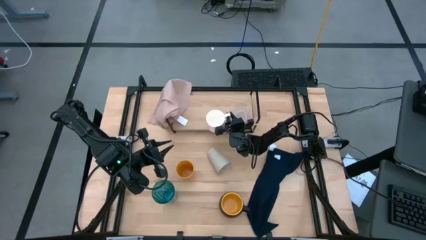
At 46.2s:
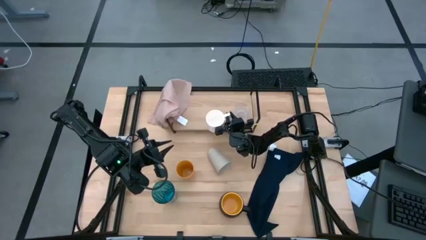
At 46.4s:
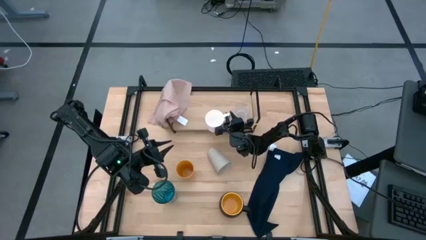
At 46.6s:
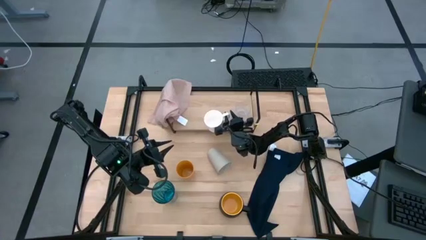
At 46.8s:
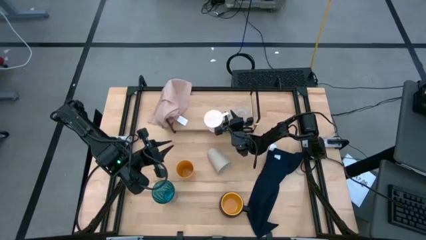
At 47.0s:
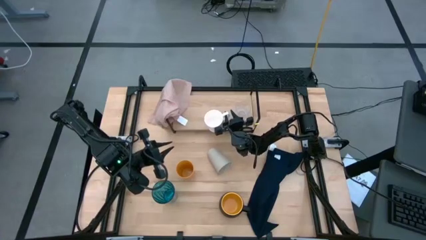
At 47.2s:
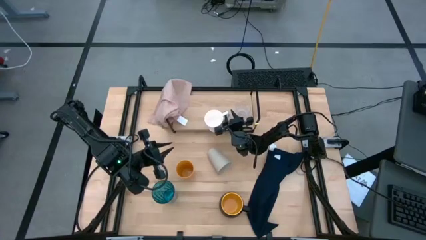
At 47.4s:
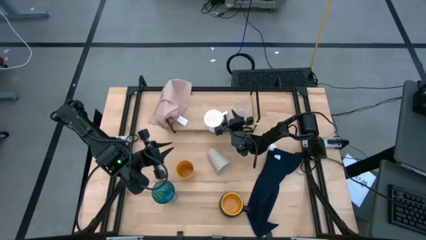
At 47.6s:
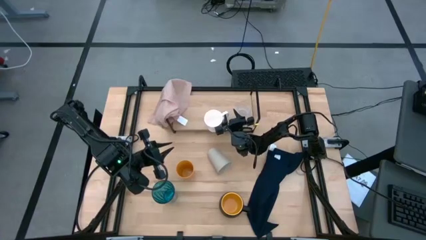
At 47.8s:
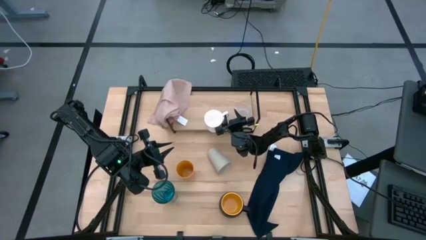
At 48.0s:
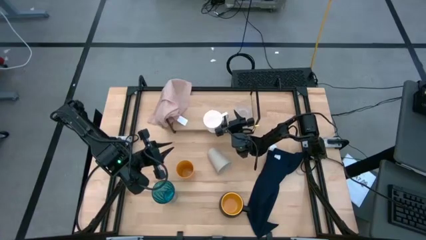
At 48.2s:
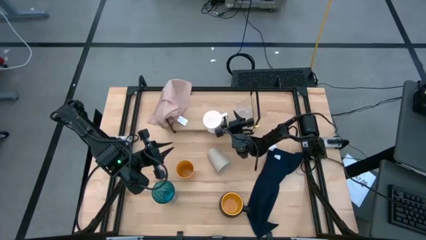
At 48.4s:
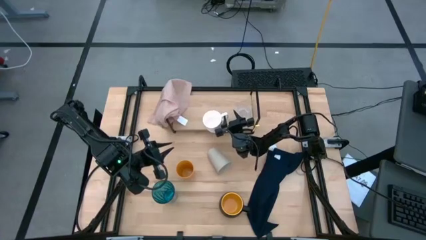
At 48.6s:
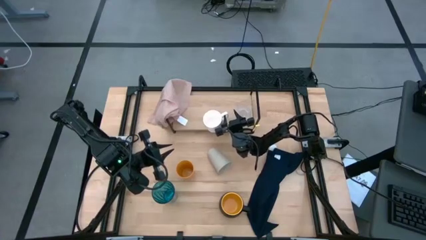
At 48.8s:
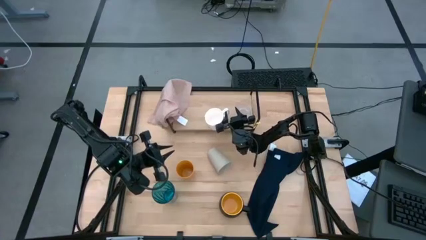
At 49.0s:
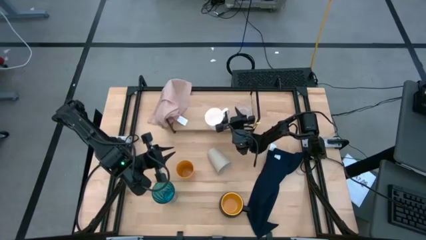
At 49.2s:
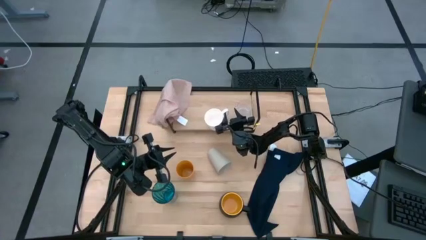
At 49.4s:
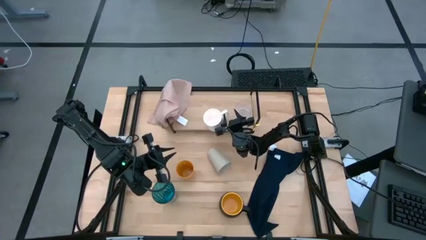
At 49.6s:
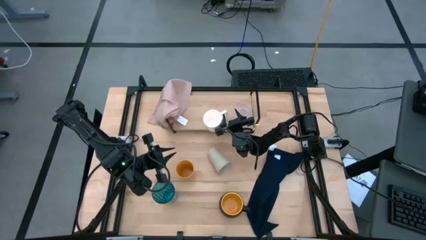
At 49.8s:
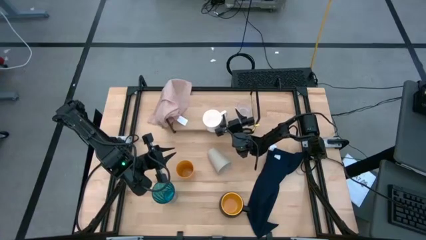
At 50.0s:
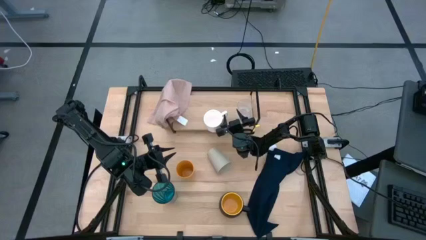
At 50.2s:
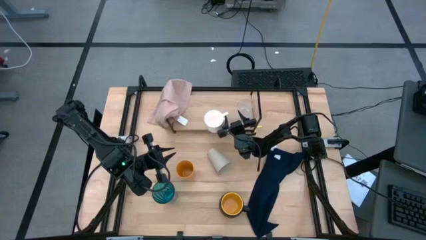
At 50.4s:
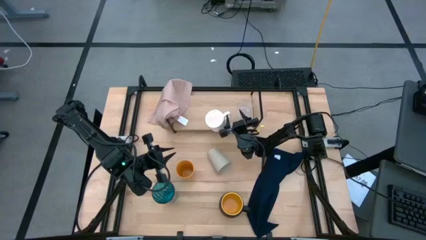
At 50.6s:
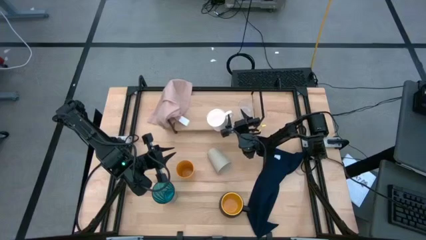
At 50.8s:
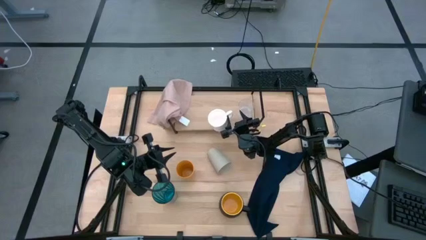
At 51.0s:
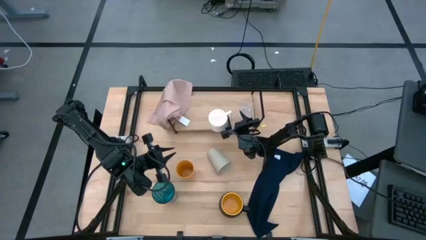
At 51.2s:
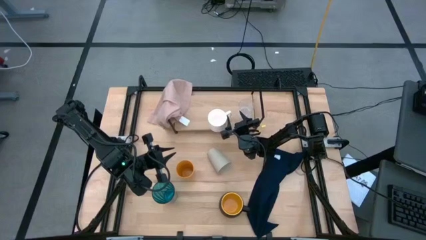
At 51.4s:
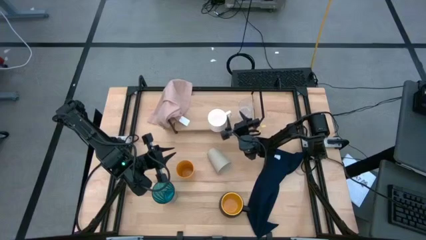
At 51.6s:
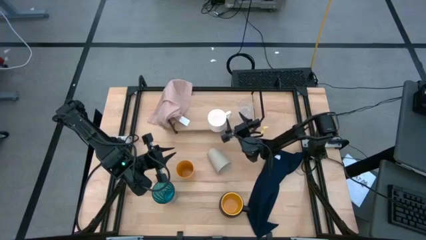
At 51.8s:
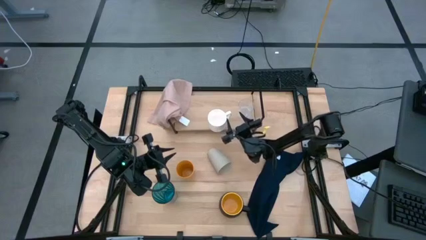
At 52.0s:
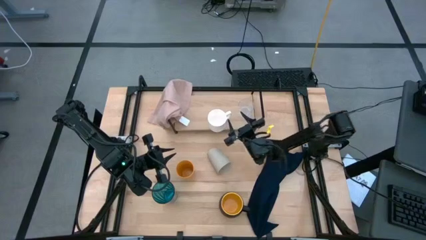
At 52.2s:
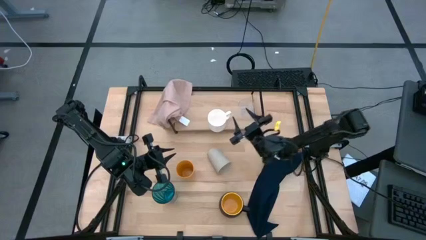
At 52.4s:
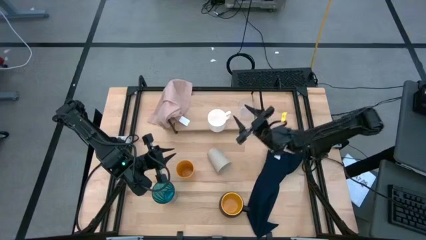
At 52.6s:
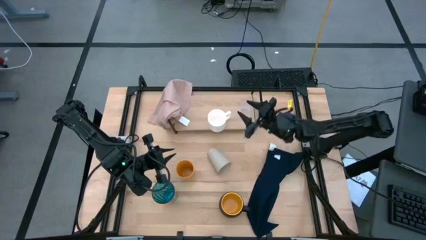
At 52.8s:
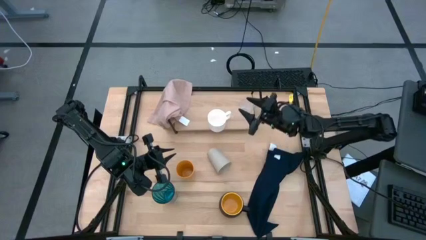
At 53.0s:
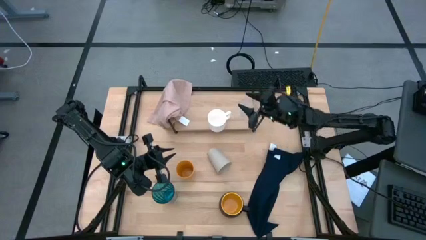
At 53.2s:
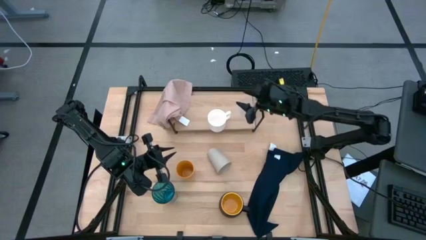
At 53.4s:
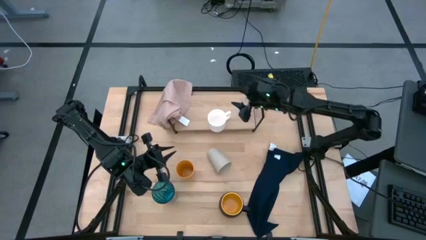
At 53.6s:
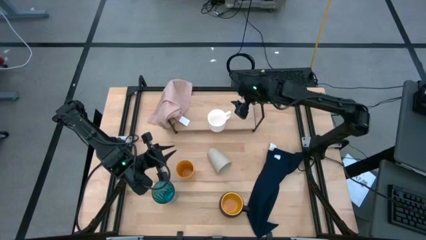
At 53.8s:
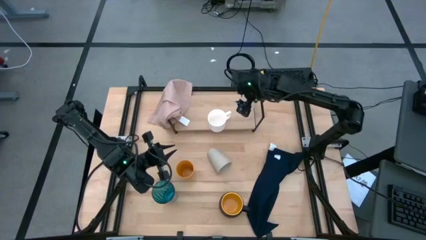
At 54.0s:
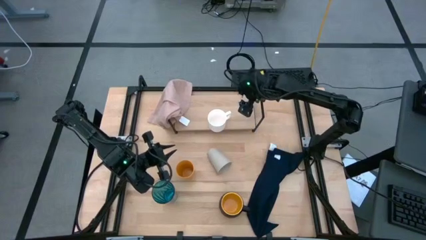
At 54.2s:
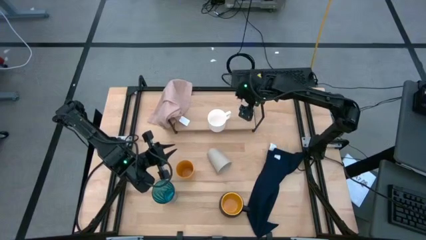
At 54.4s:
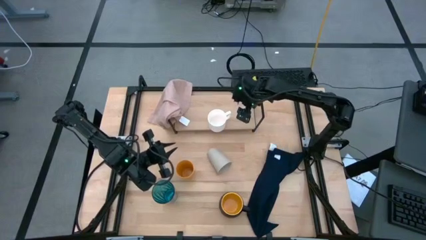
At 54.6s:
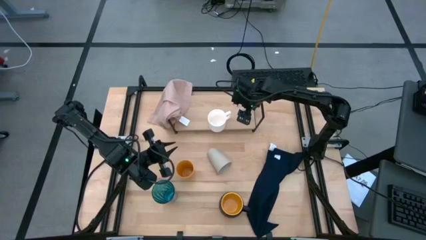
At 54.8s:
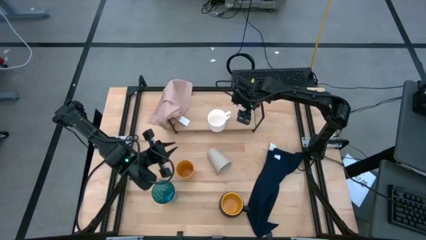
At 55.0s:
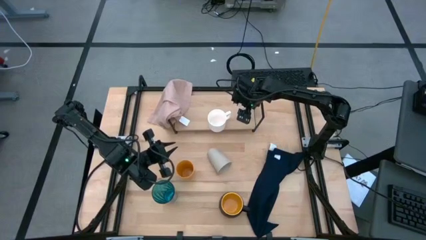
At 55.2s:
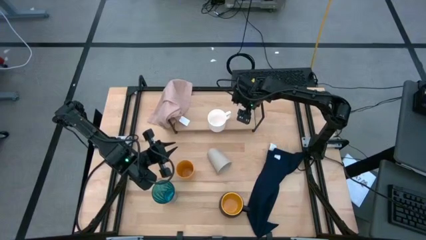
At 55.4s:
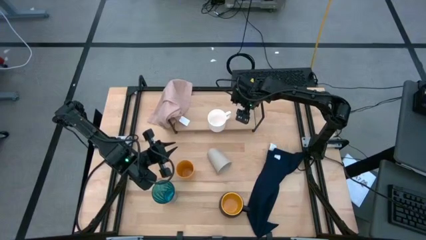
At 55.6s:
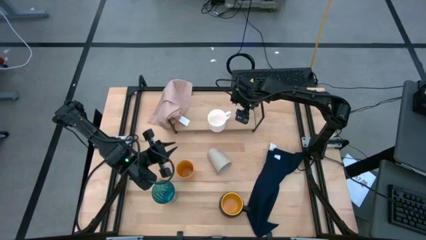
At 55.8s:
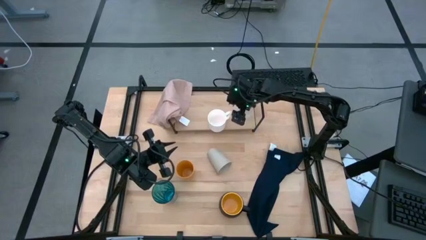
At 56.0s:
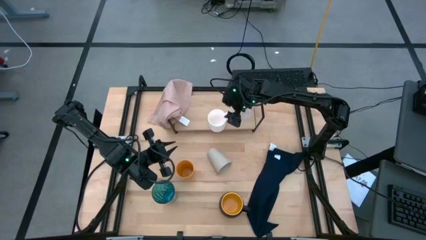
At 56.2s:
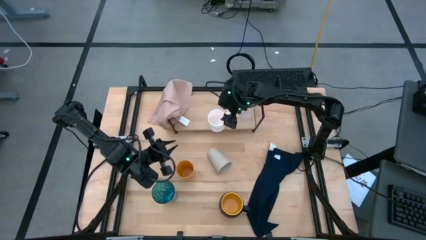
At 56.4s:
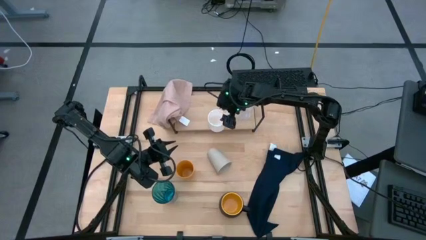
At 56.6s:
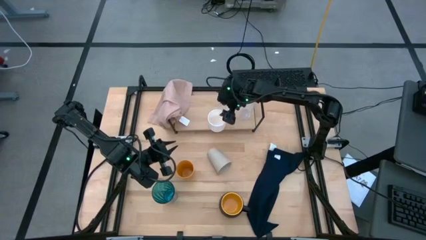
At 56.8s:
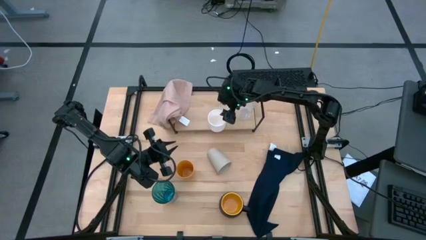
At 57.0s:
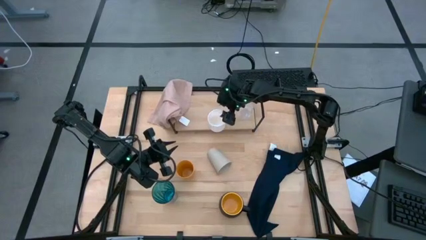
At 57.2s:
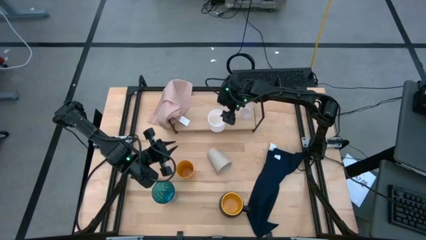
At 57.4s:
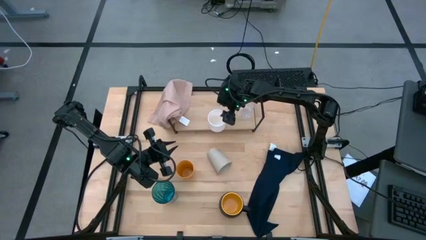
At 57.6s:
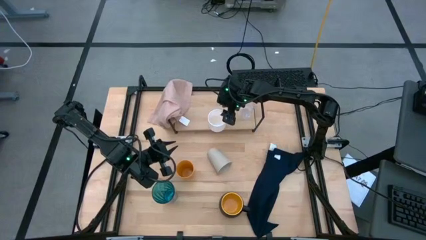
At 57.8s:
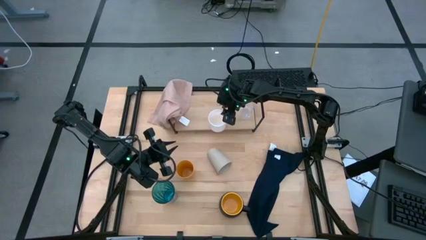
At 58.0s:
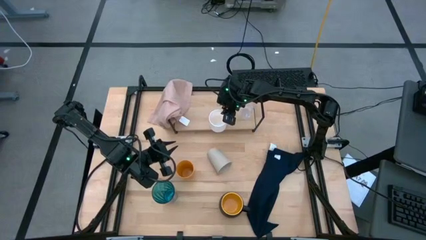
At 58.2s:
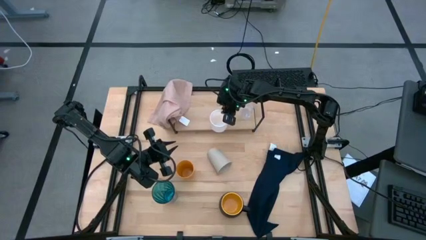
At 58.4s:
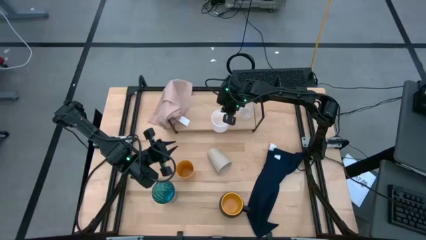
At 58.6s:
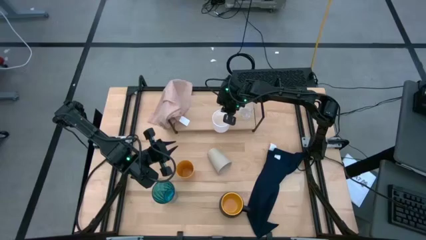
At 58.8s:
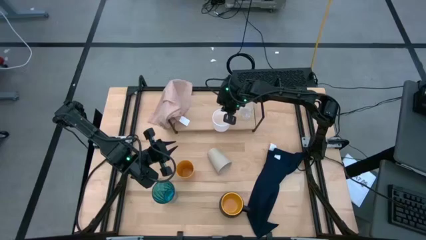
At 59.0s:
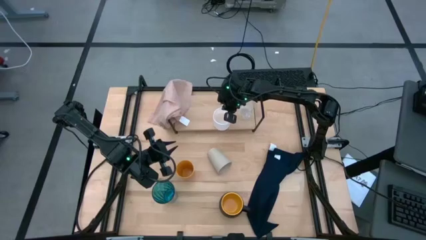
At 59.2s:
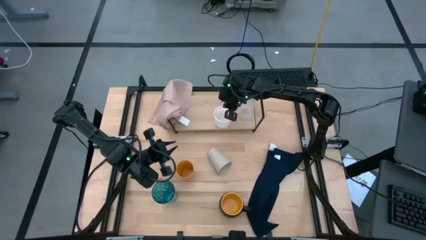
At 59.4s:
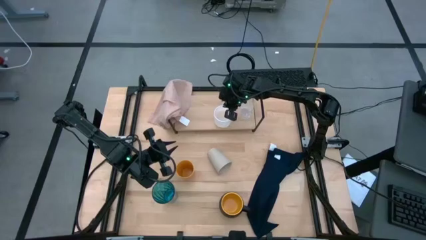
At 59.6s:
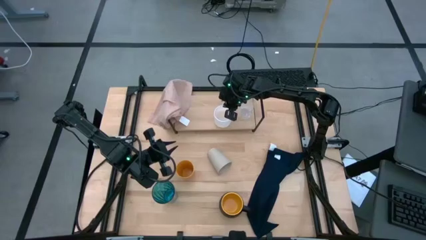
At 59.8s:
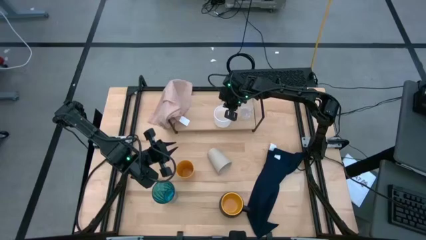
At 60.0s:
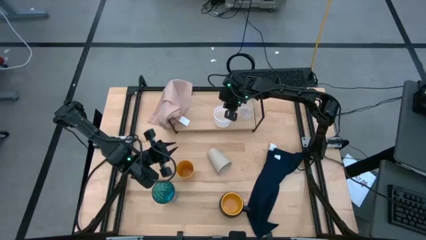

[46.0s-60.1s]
Task: Stack small to large cups/mugs on shelf
Put the white mug on the shelf
